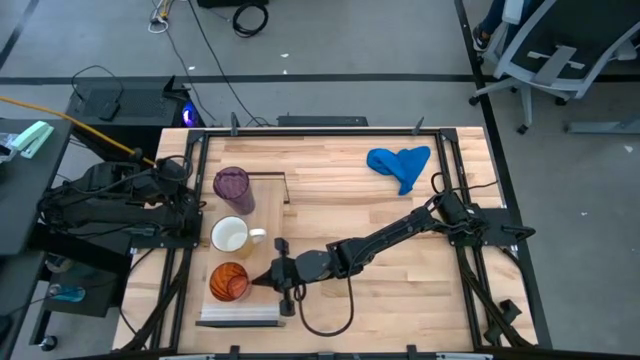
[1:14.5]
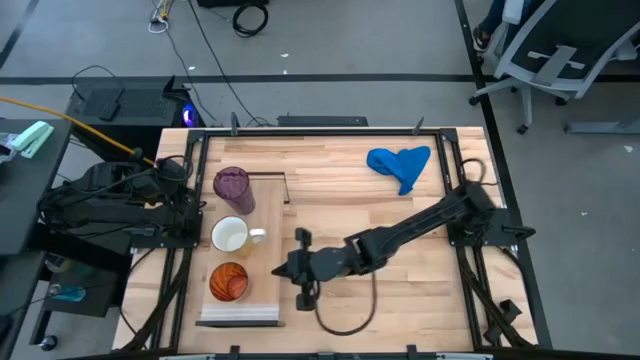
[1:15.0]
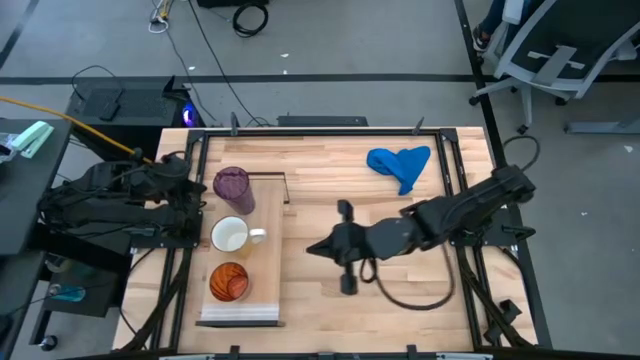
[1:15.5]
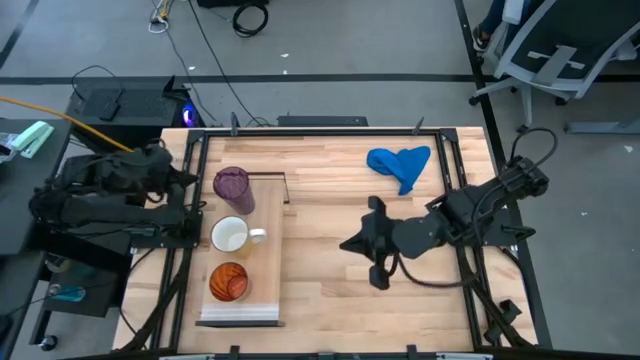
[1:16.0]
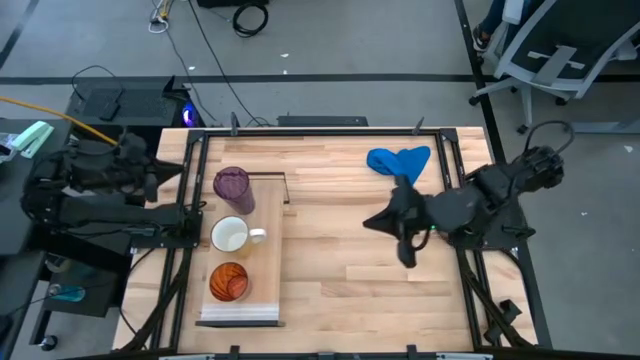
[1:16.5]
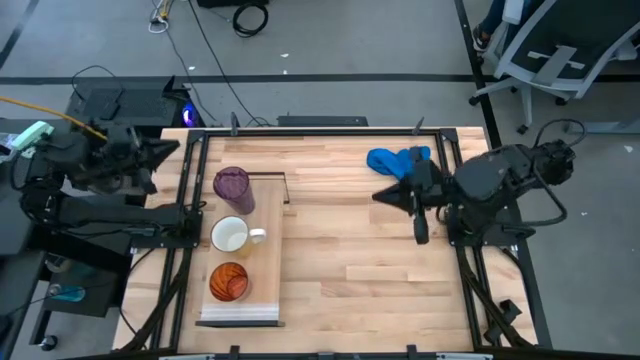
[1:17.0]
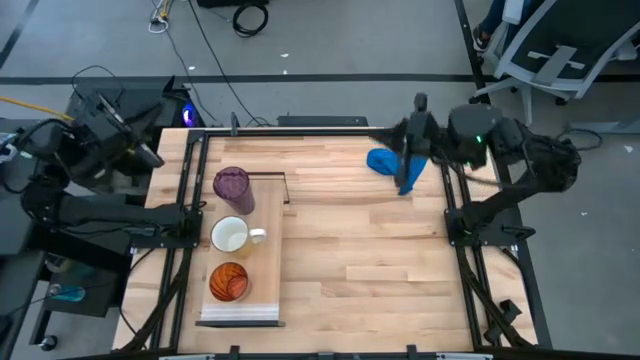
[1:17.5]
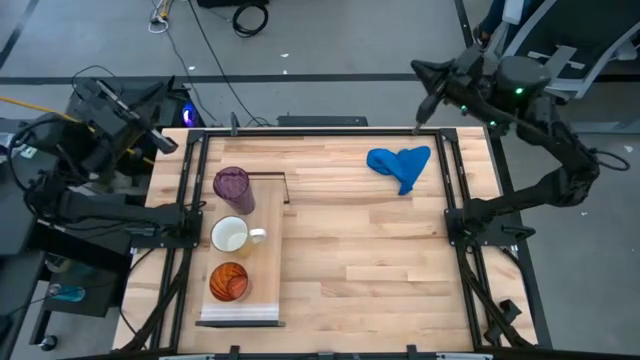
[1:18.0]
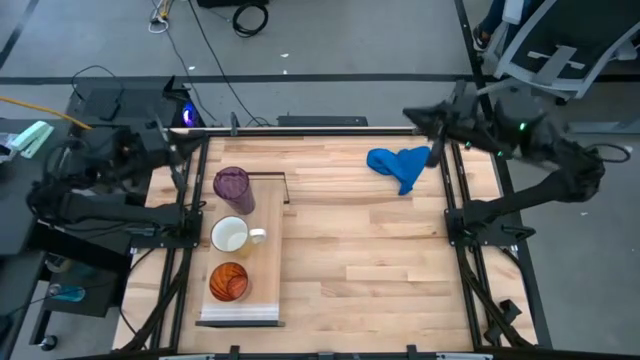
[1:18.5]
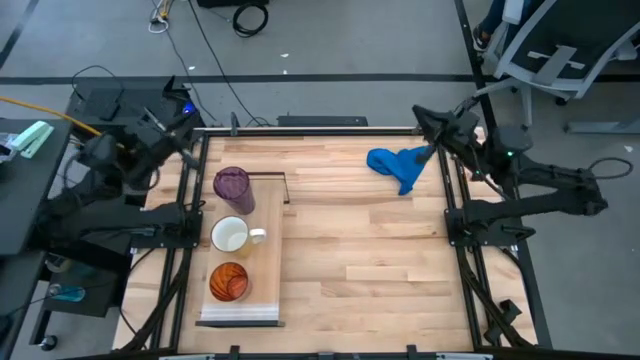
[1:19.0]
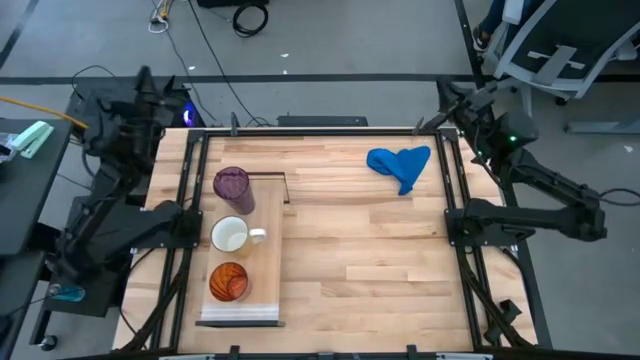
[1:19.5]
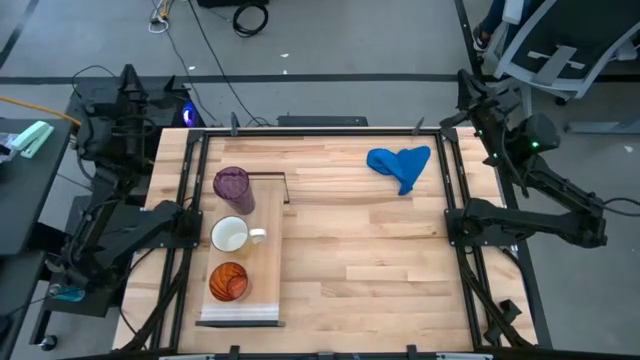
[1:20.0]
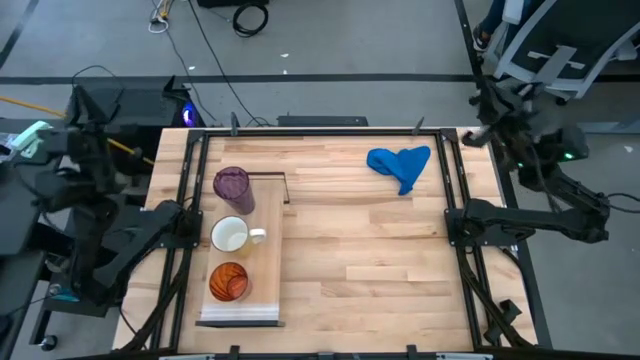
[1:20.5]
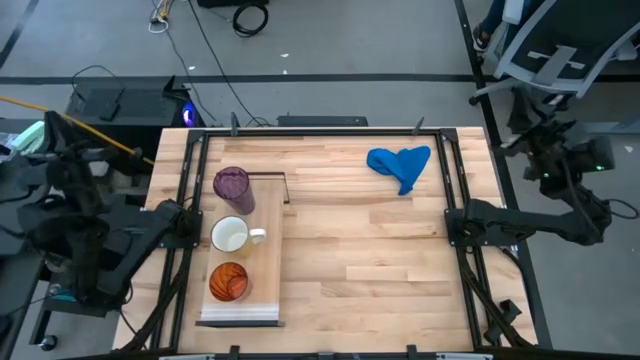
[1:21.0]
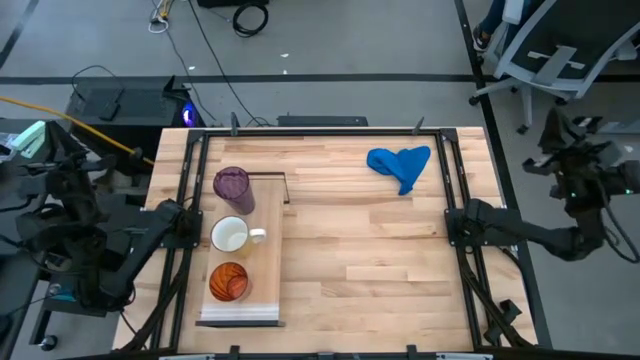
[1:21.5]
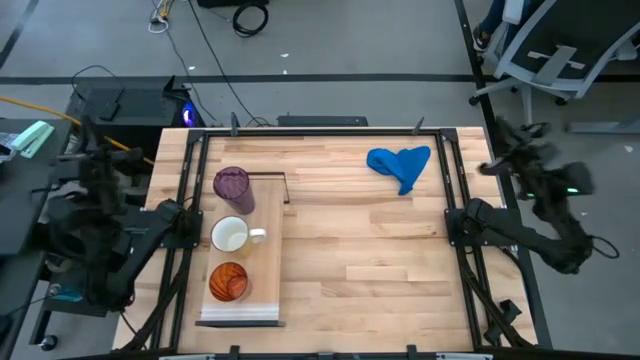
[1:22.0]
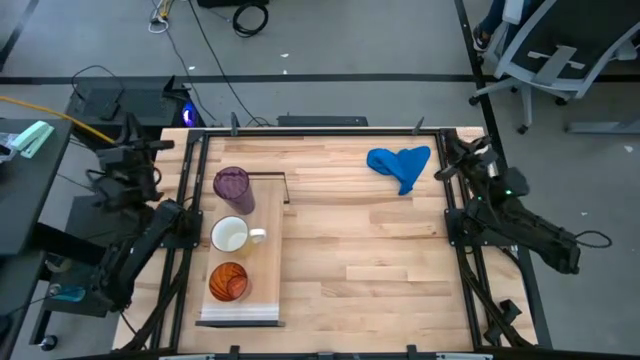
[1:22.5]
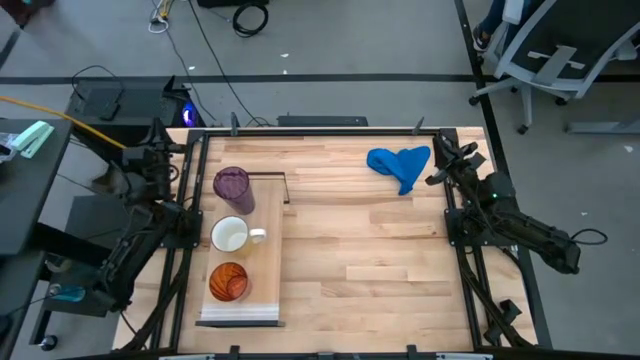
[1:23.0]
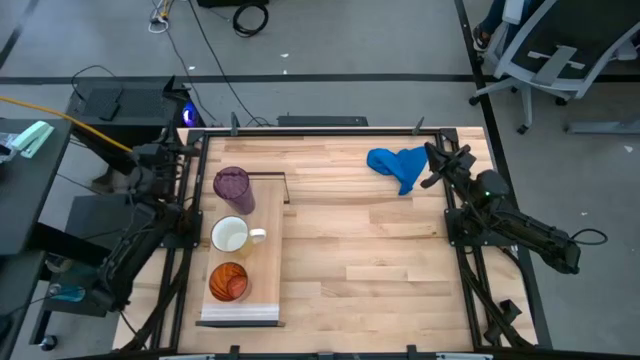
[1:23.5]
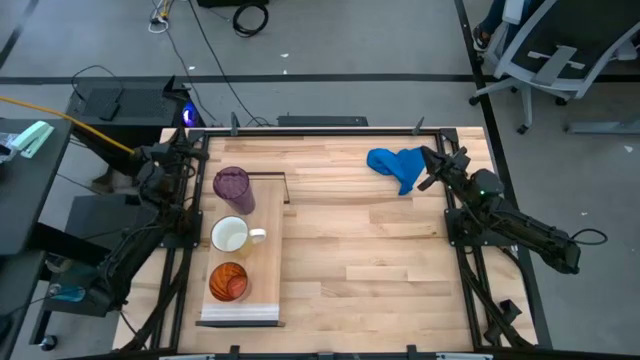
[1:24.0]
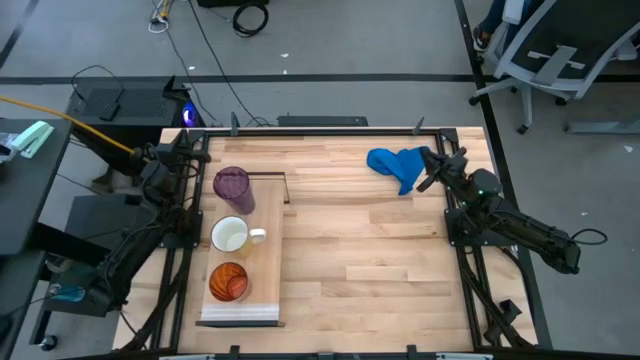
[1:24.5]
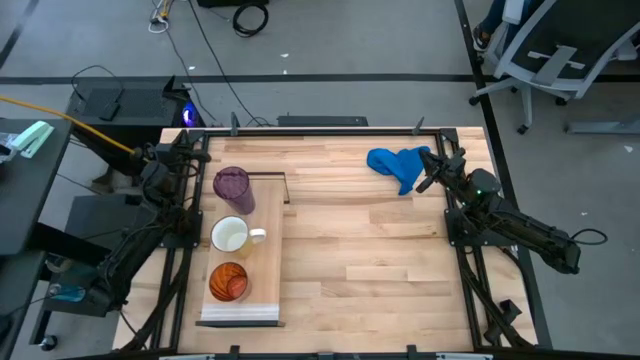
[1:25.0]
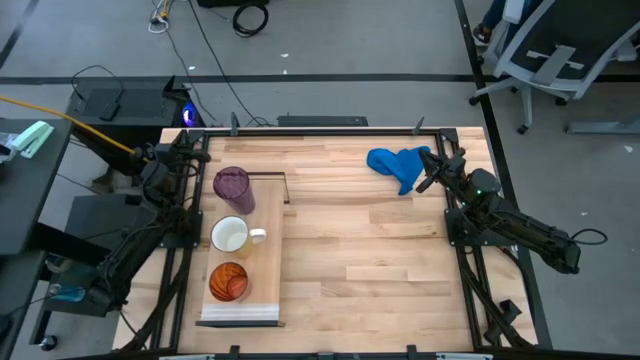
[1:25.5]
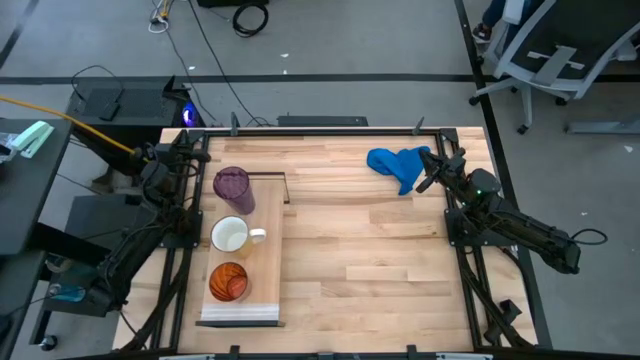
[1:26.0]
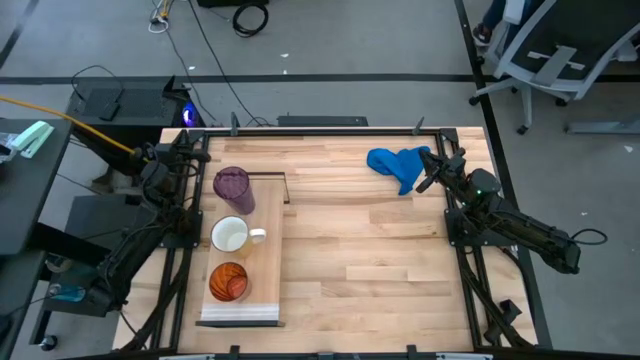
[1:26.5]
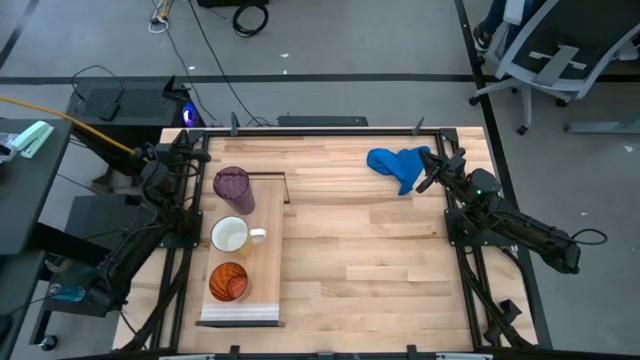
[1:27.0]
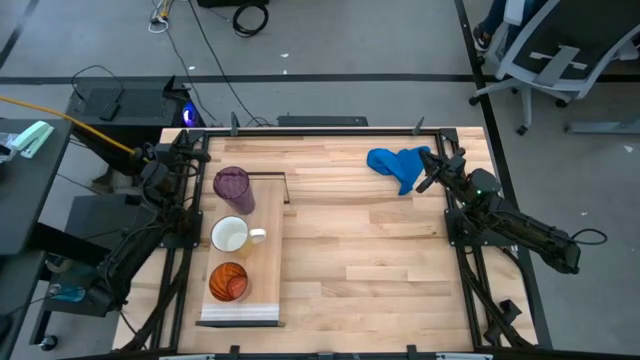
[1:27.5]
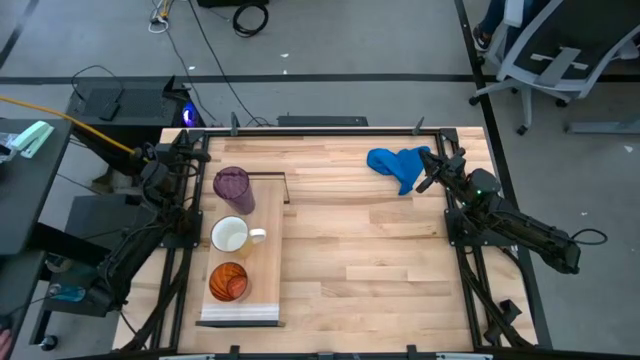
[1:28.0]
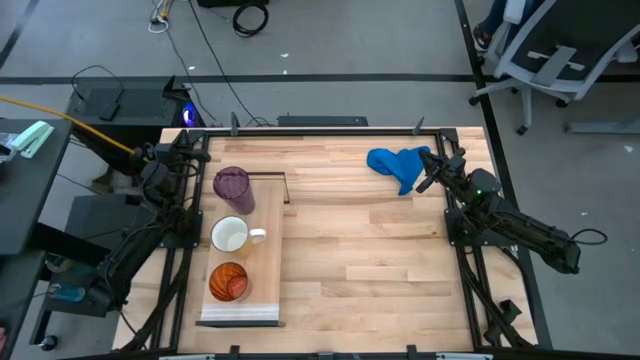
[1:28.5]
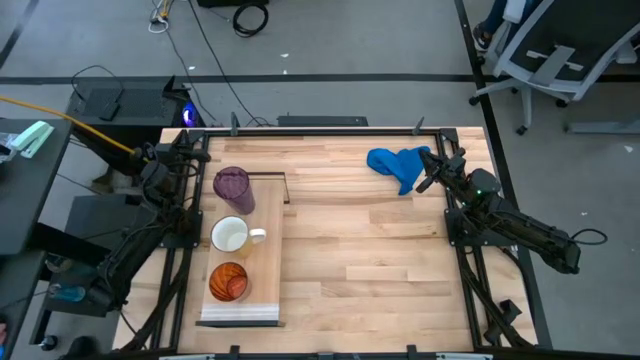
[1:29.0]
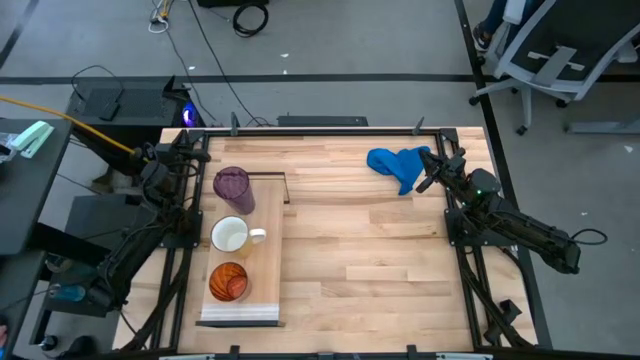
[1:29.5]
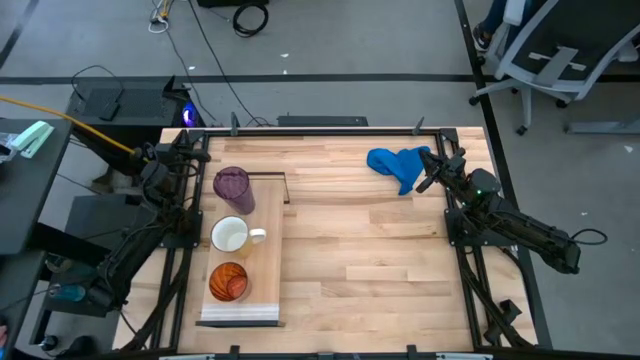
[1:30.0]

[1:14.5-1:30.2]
Task: Stack small to large cups/mugs on shelf
Return to Home Position

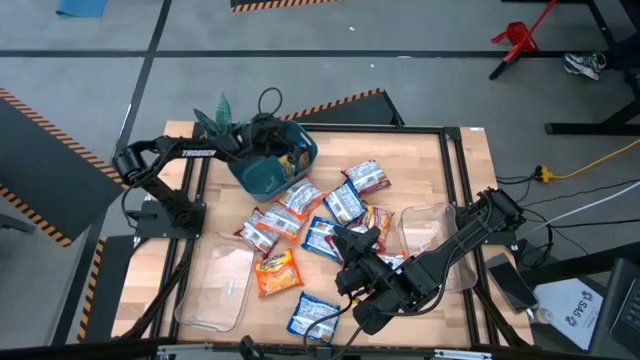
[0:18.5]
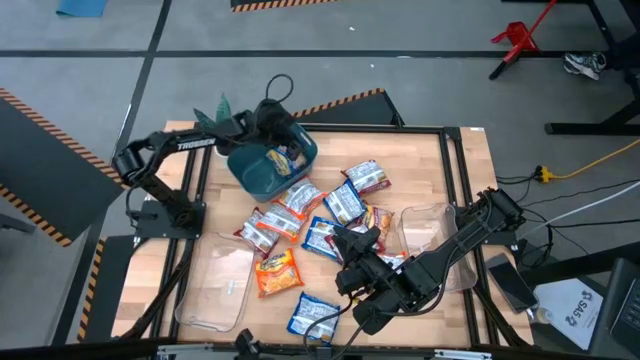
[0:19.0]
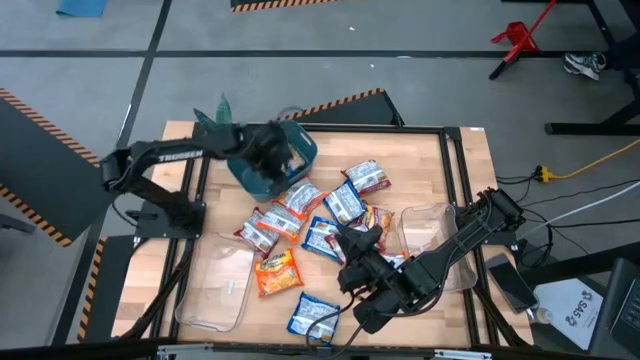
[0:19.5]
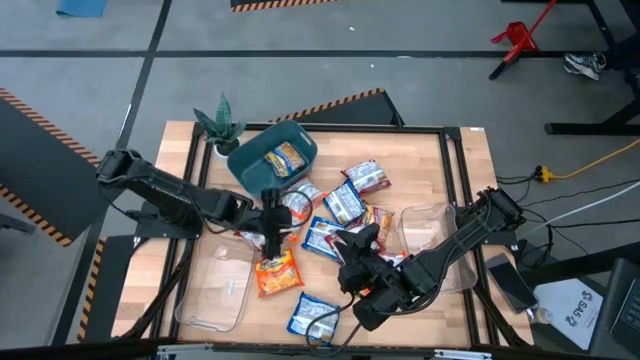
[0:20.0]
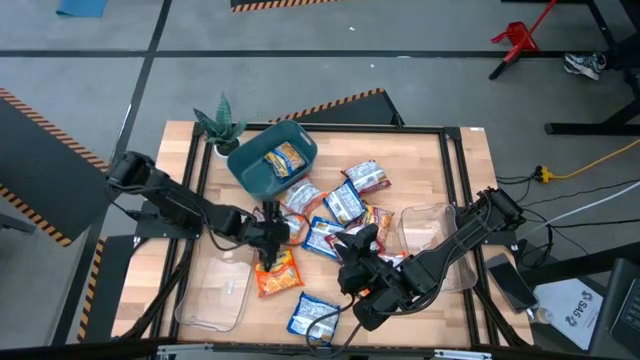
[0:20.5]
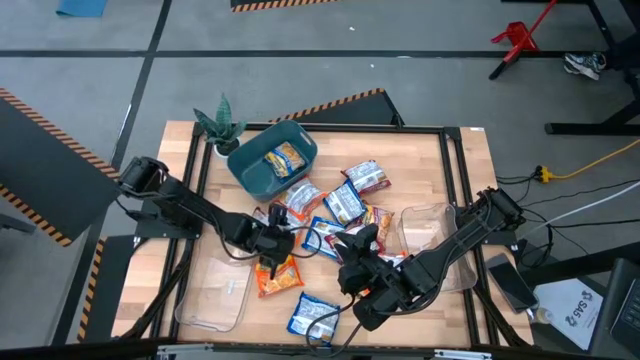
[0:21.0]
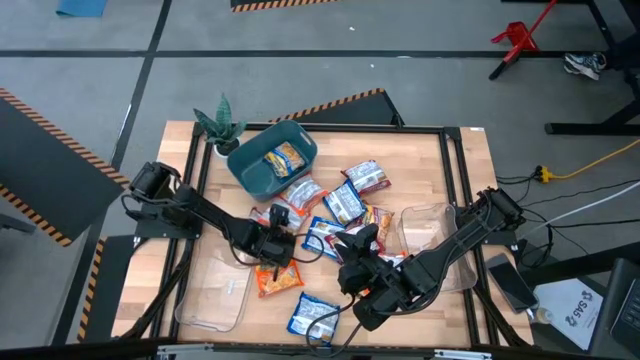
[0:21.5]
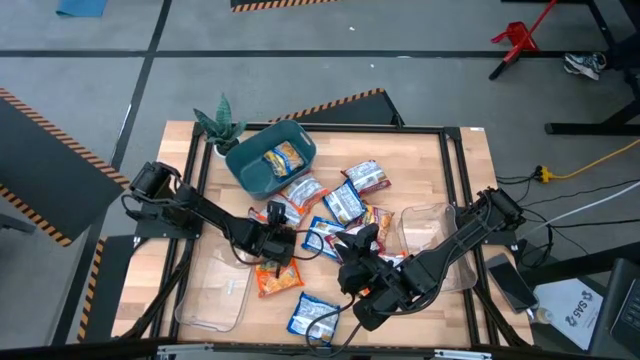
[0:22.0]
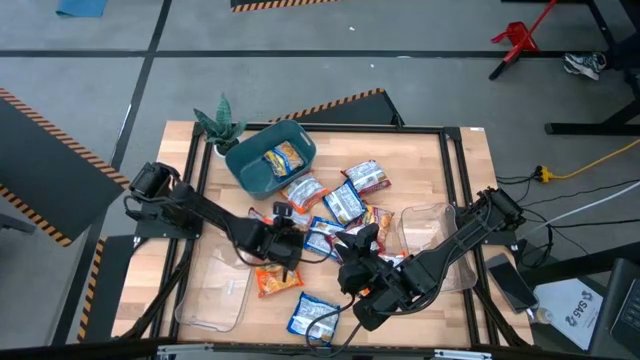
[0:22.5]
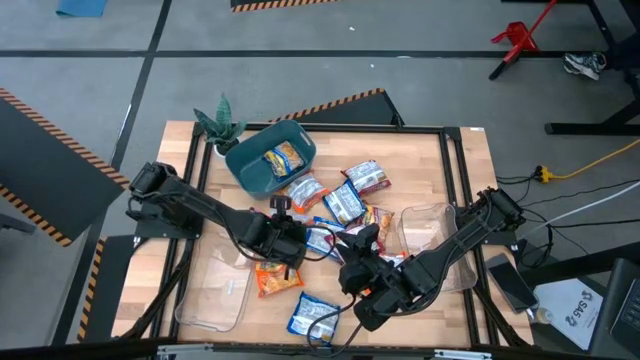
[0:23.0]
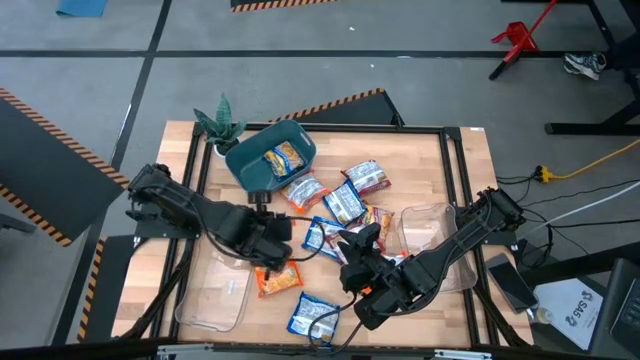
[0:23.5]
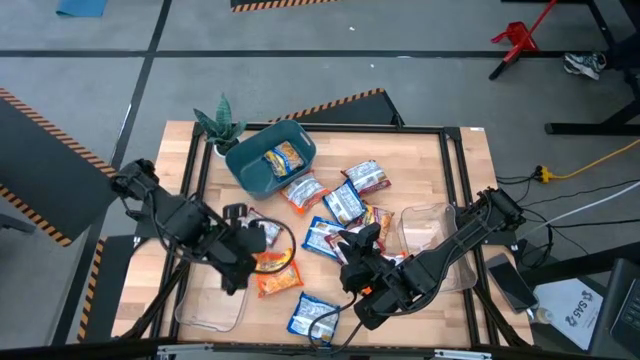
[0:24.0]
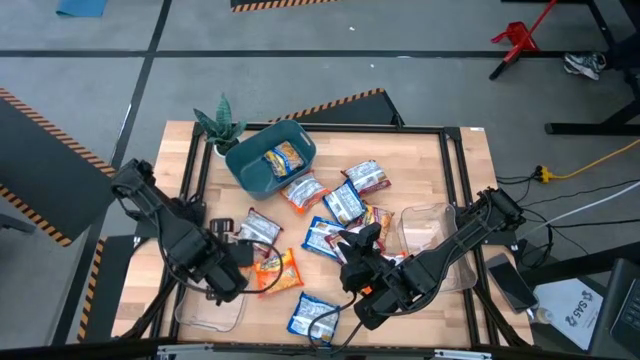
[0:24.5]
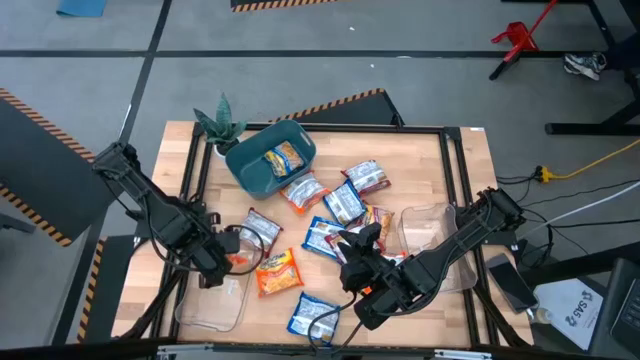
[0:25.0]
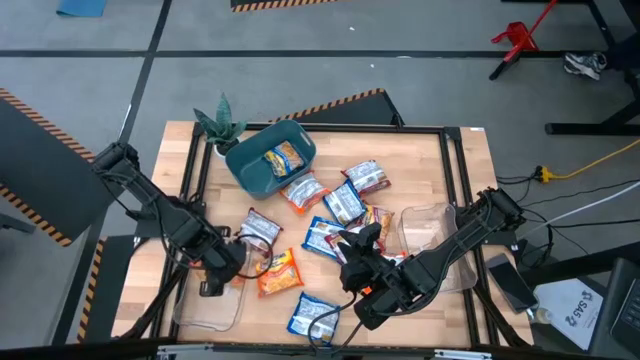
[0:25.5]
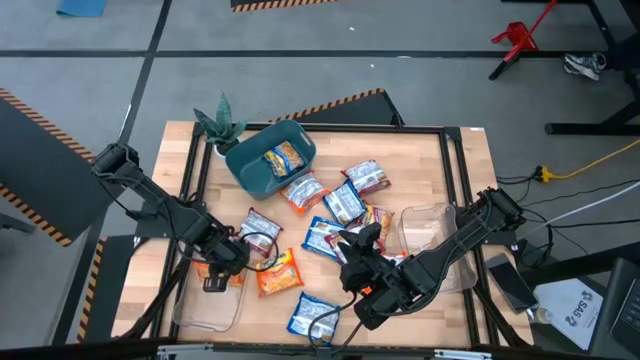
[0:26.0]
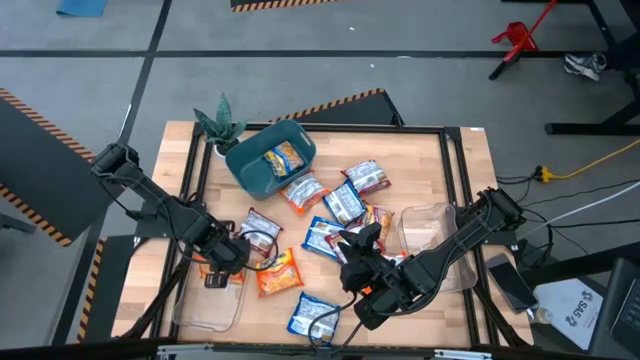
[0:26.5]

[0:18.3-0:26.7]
Task: Sort Maruchan noodles
Put the orange noodle pack into the left transparent bin
